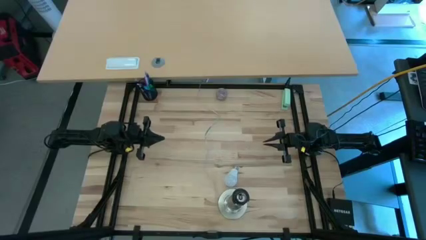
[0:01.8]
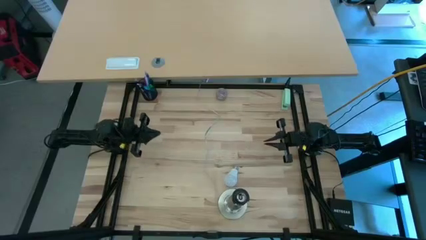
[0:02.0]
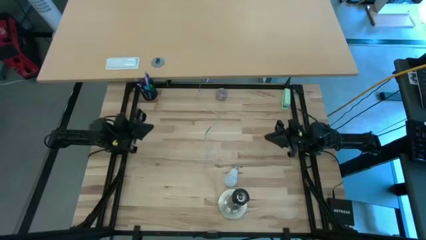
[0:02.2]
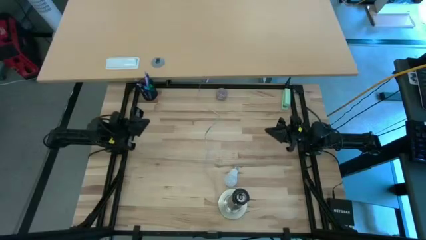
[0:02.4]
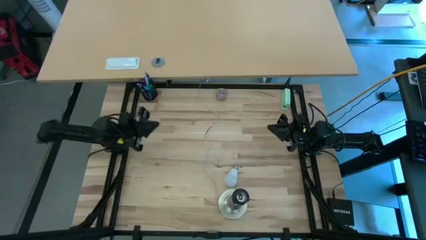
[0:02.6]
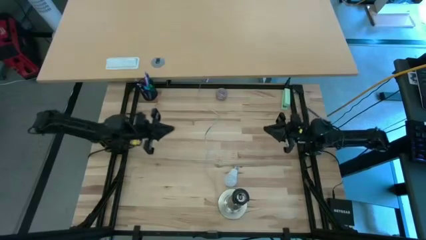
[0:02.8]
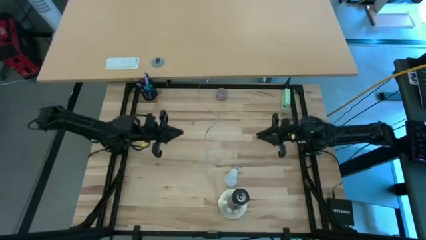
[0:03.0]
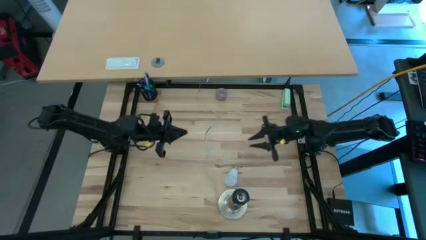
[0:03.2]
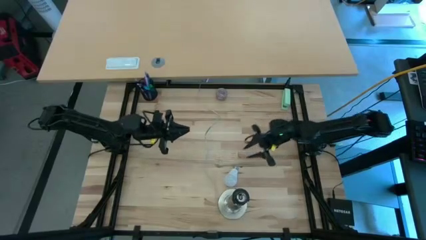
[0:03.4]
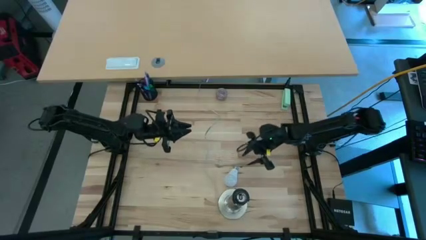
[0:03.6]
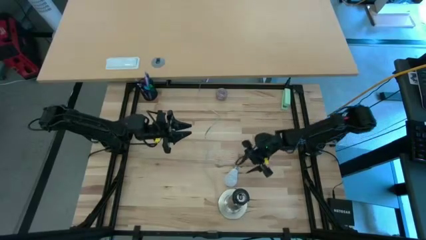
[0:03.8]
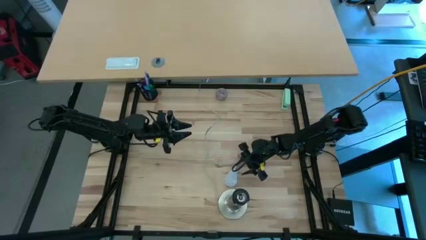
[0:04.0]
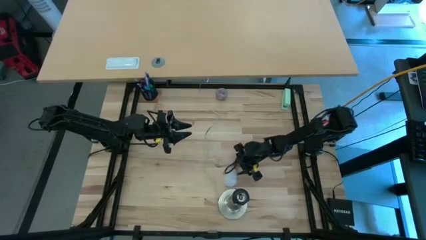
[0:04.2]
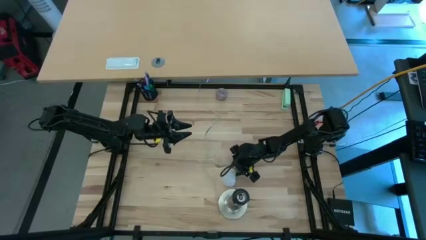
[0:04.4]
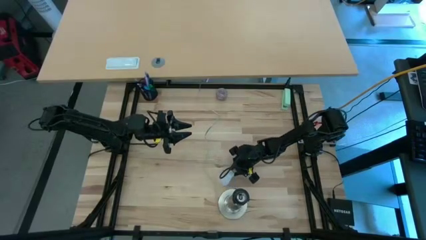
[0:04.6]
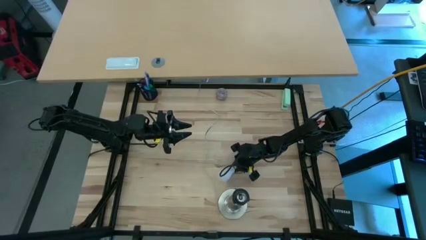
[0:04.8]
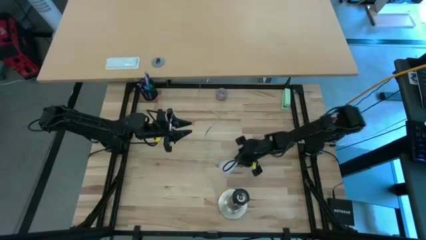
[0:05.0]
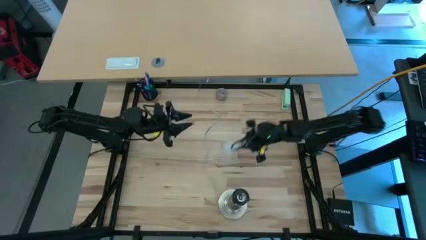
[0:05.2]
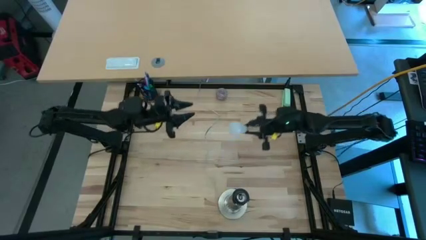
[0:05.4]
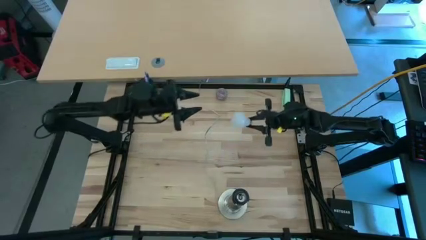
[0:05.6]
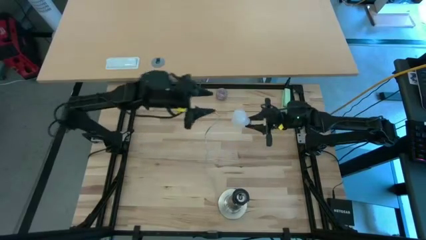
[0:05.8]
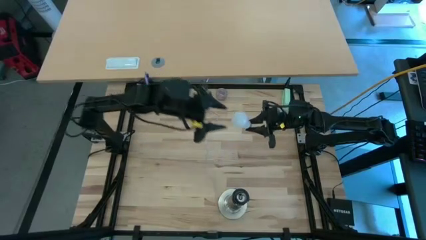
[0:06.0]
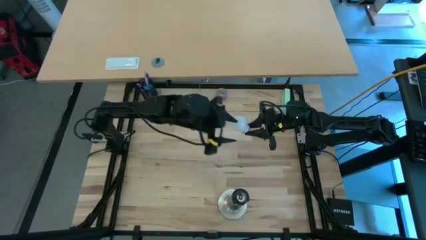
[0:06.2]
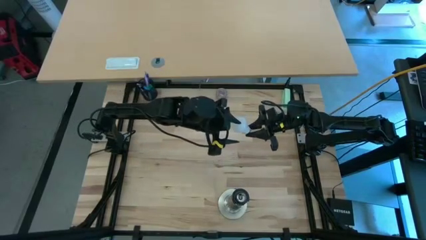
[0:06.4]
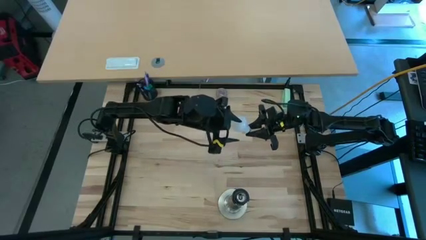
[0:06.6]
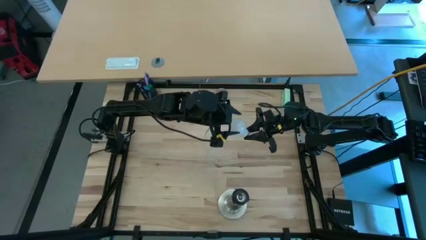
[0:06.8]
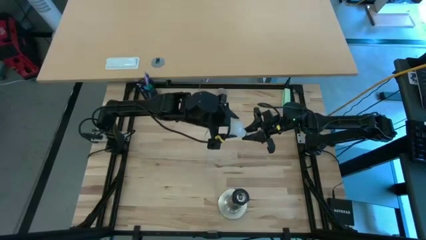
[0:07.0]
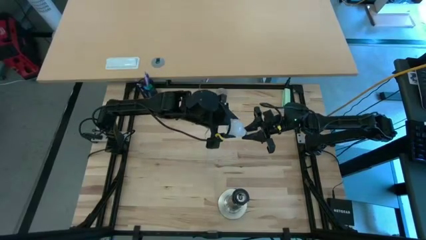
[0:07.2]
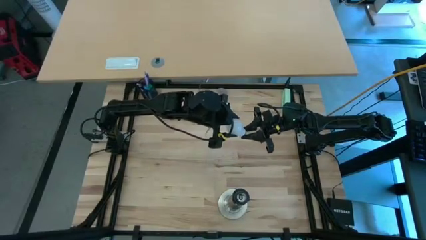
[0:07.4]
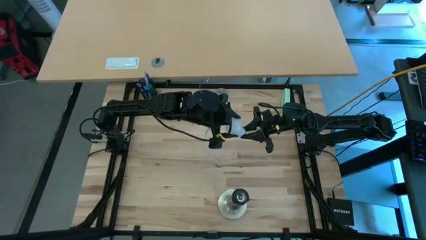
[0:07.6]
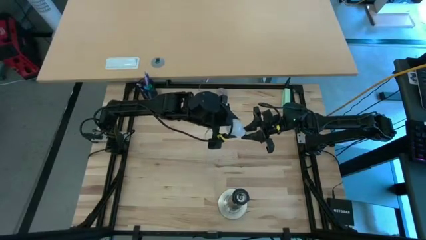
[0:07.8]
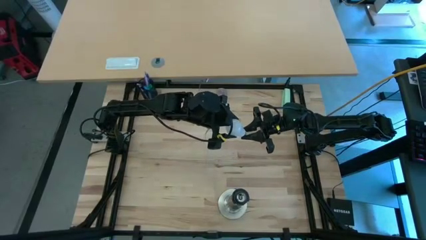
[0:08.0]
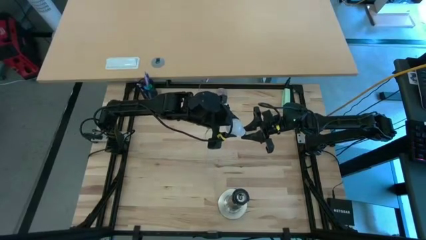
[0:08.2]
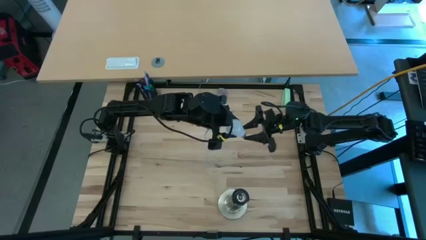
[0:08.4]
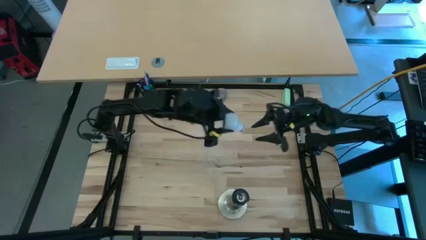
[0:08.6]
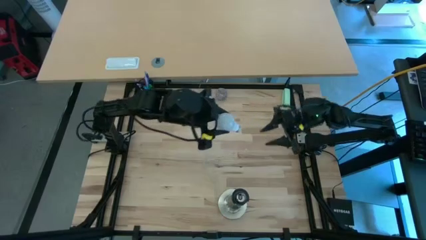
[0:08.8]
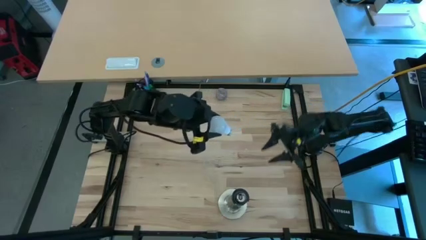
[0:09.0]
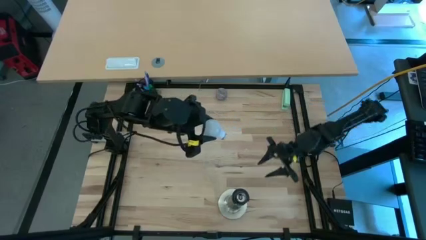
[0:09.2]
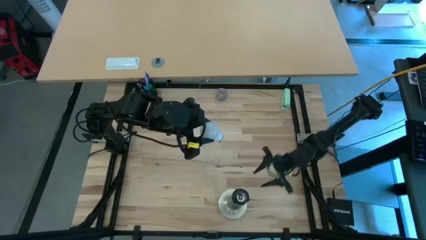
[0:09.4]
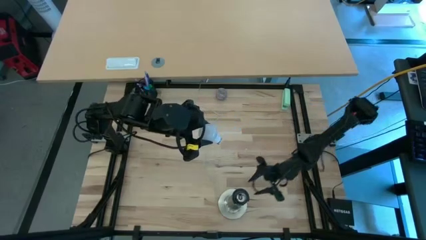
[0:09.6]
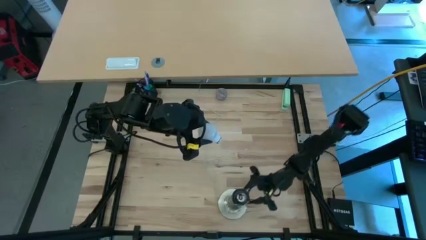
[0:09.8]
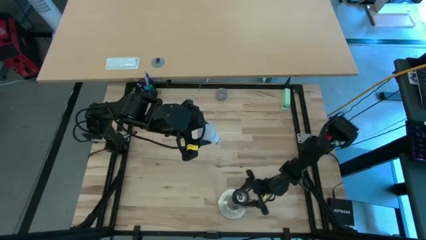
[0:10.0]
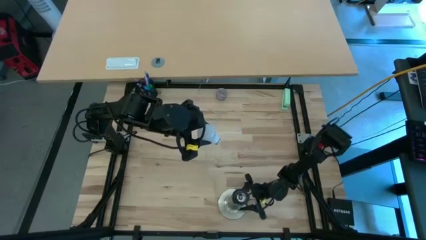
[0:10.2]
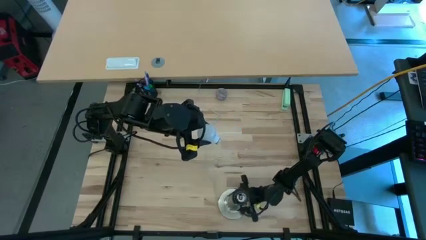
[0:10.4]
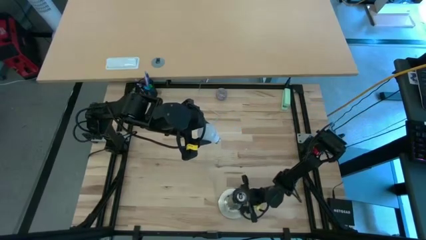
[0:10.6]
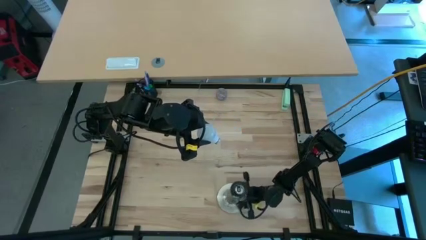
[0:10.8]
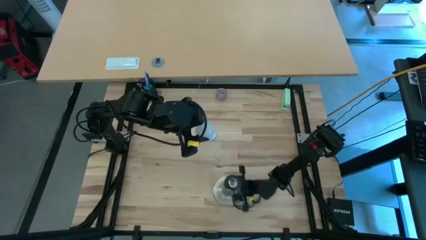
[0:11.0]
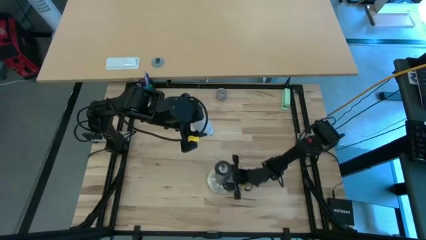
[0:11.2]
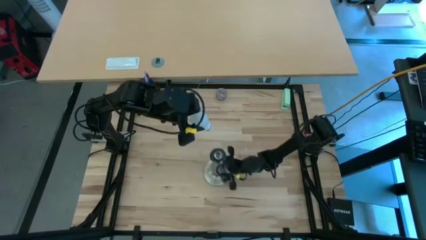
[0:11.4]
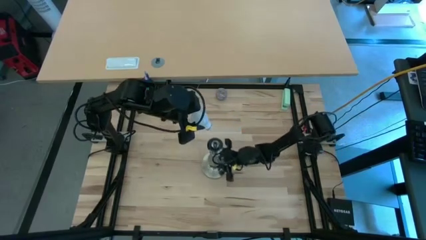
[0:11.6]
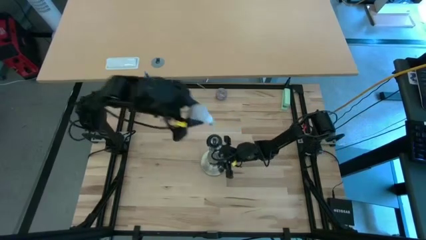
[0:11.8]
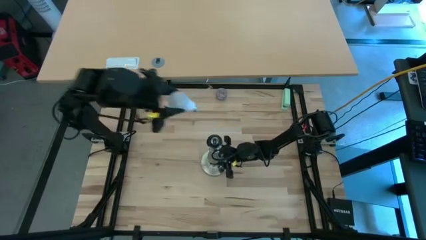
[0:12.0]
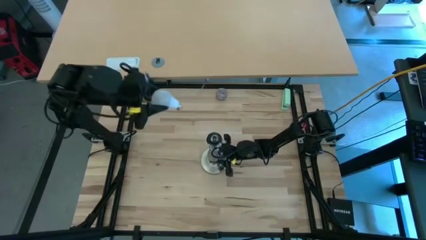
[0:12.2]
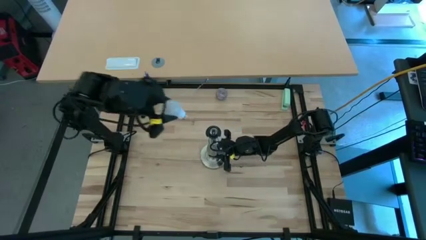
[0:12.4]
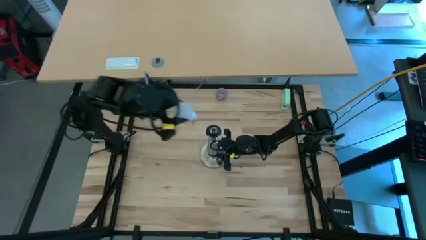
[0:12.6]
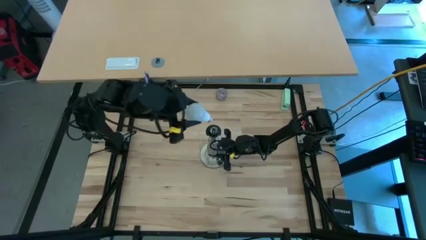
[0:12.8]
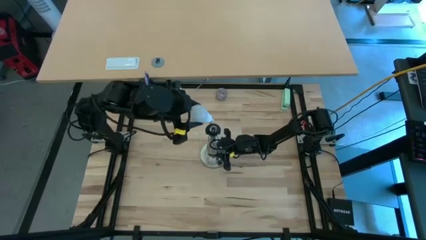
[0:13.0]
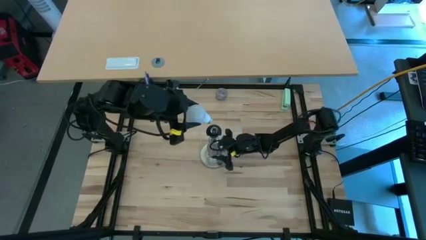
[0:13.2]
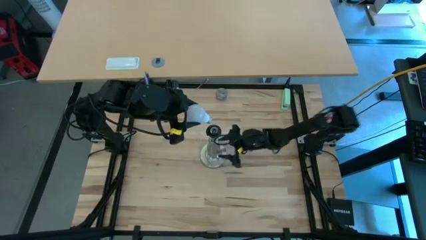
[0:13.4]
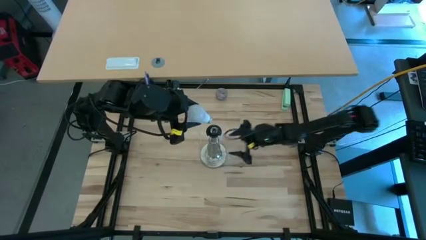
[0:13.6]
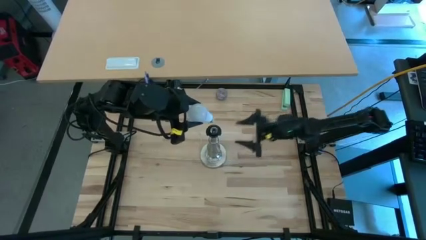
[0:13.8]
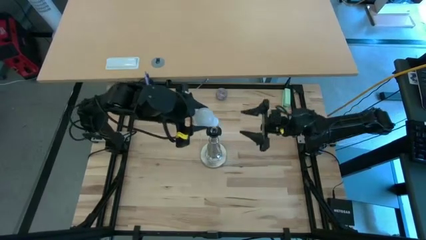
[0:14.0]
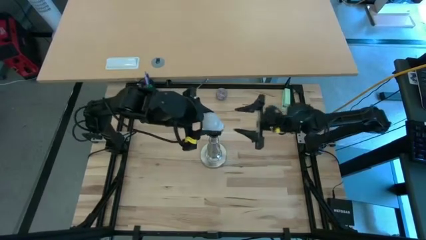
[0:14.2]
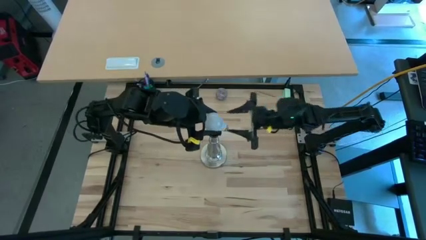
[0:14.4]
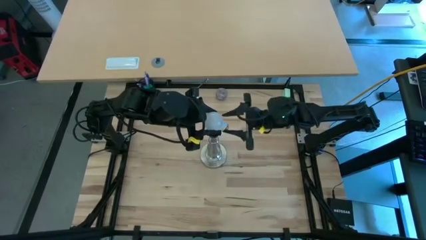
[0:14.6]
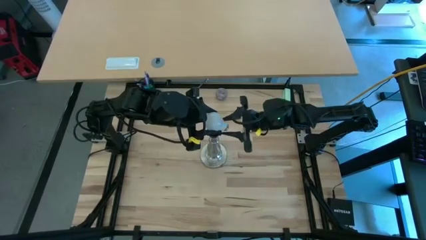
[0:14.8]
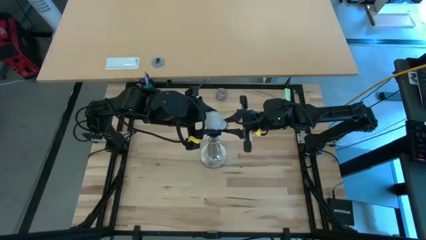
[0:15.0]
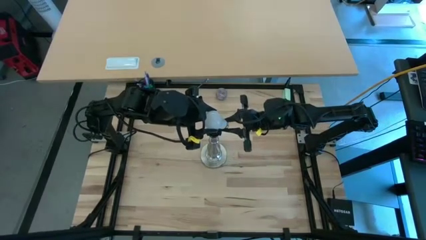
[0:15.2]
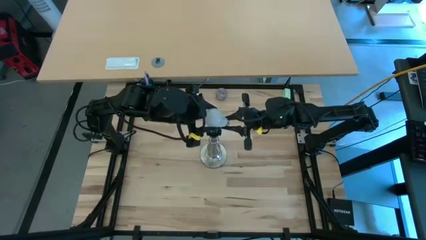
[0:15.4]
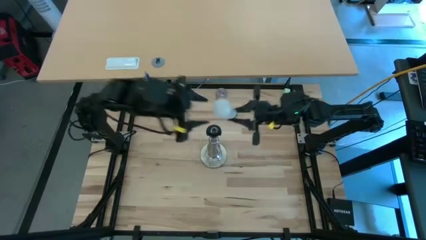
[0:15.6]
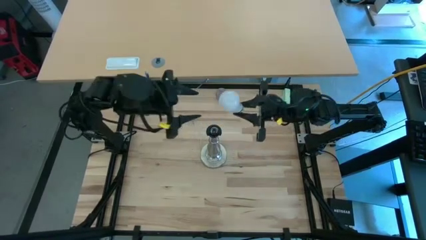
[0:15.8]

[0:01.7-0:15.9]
Task: Screw lightbulb
Insert the lightbulb into the silver lamp
